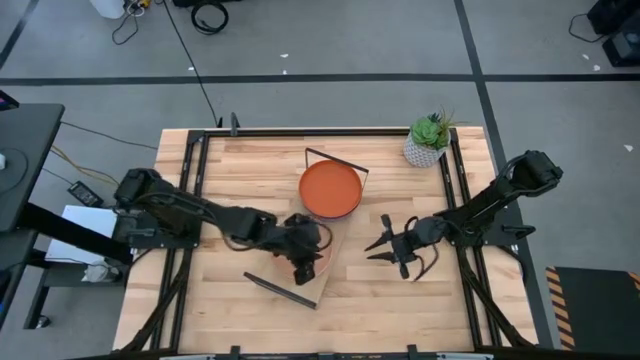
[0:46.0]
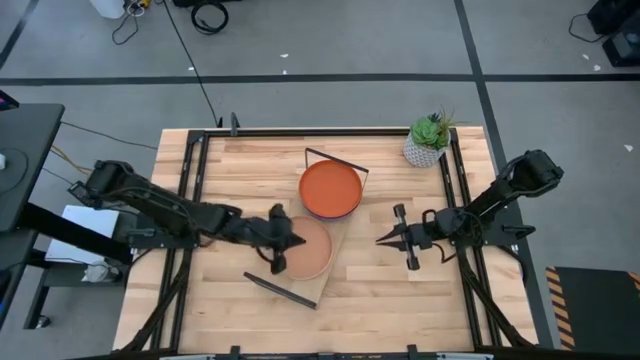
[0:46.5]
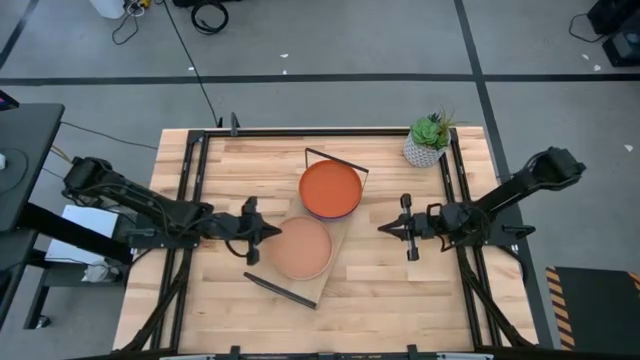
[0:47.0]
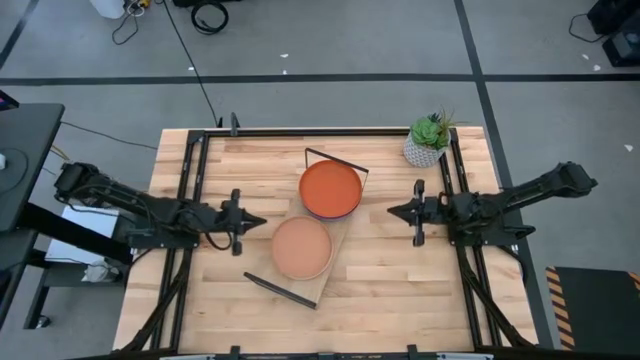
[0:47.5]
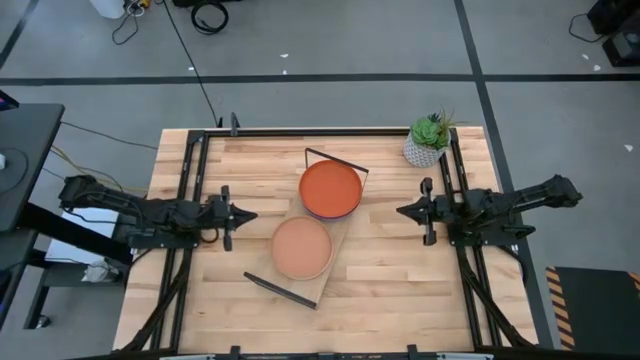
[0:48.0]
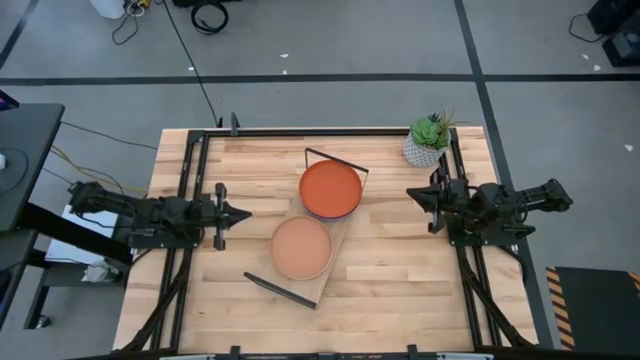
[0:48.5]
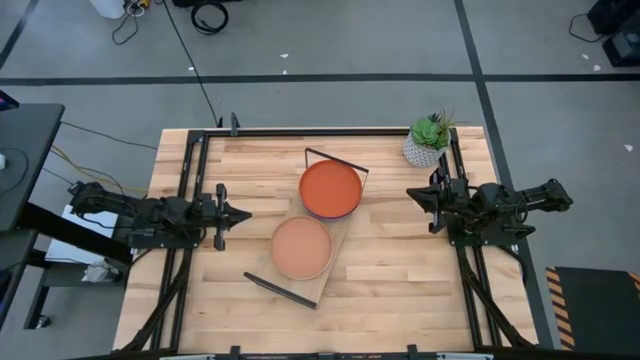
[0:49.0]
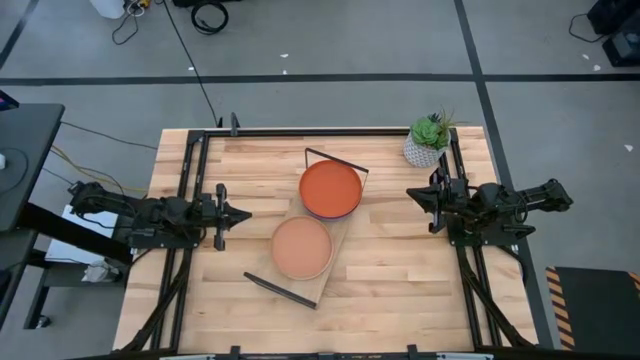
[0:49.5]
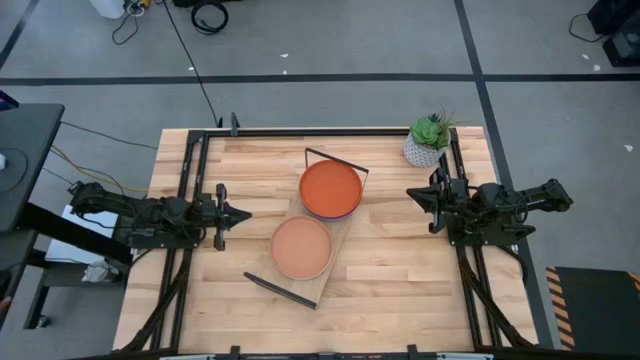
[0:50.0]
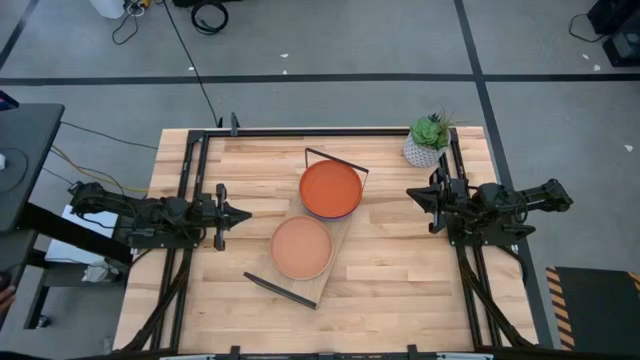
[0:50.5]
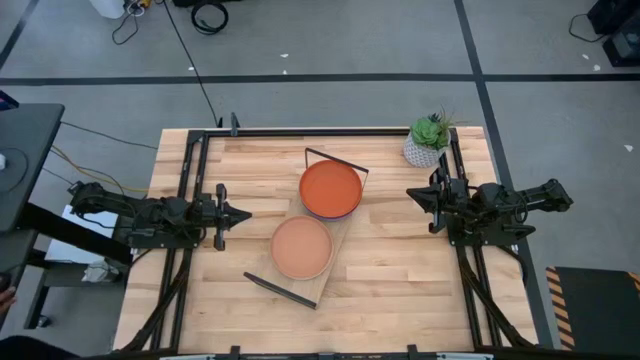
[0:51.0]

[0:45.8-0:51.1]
Task: Place and stack plates onto a shelf
Return to Home Position

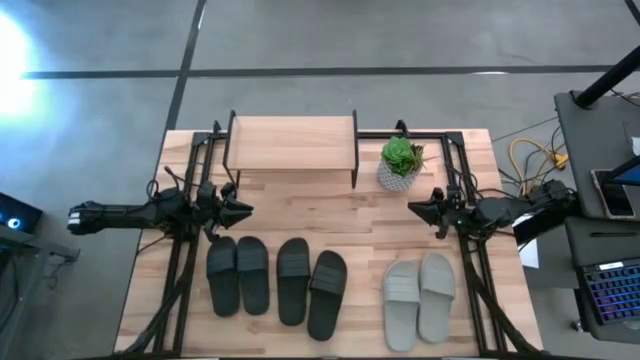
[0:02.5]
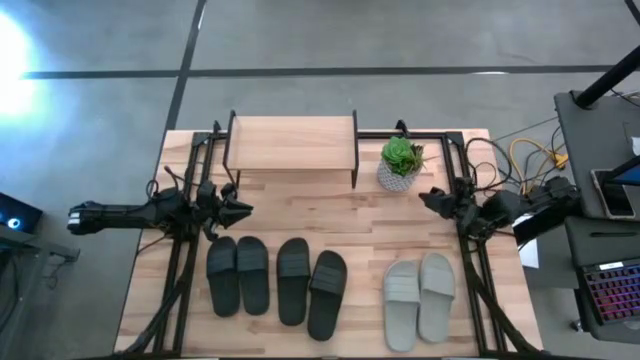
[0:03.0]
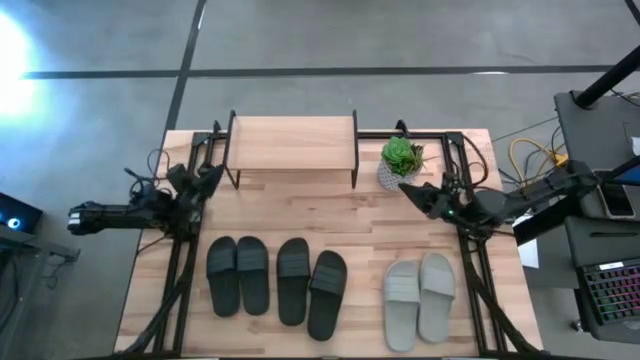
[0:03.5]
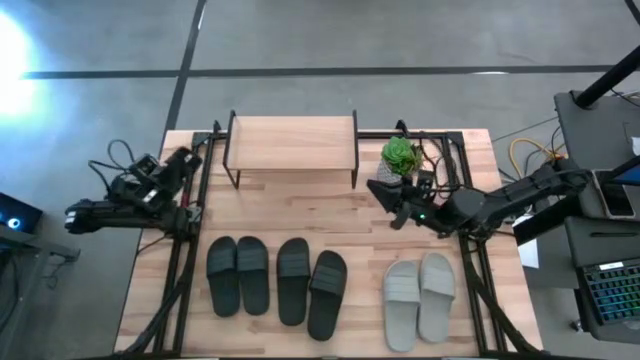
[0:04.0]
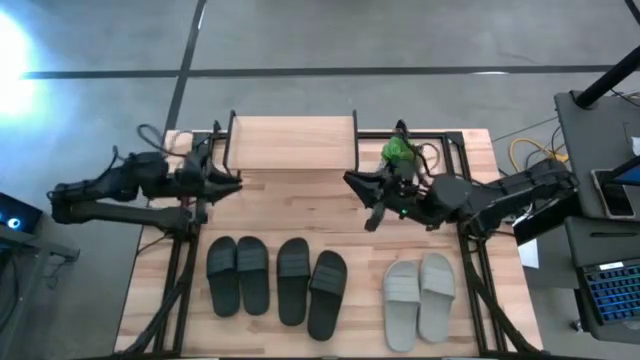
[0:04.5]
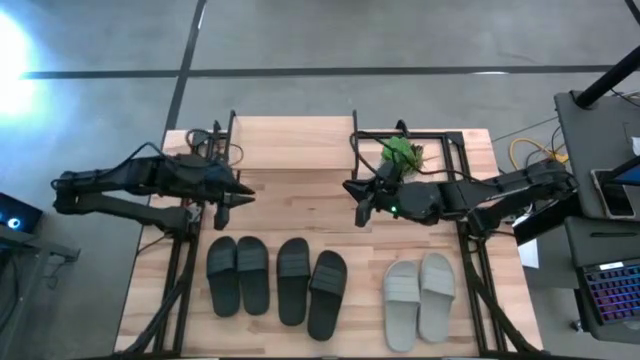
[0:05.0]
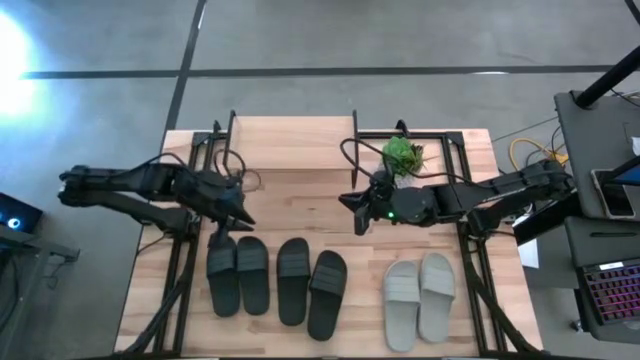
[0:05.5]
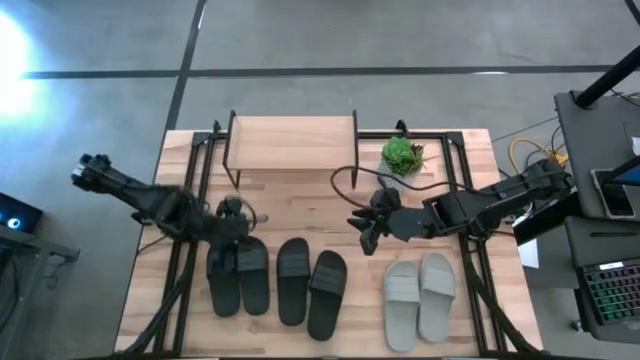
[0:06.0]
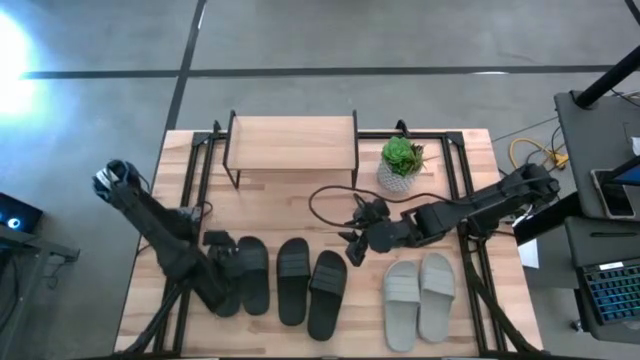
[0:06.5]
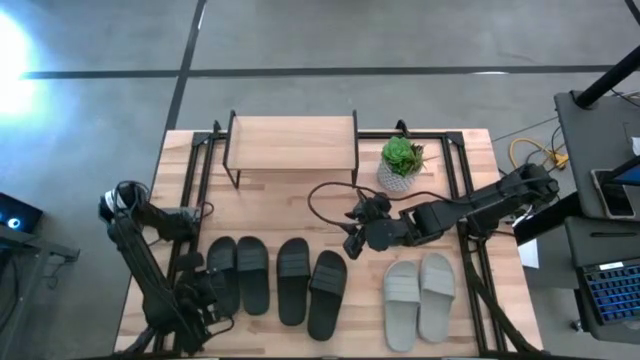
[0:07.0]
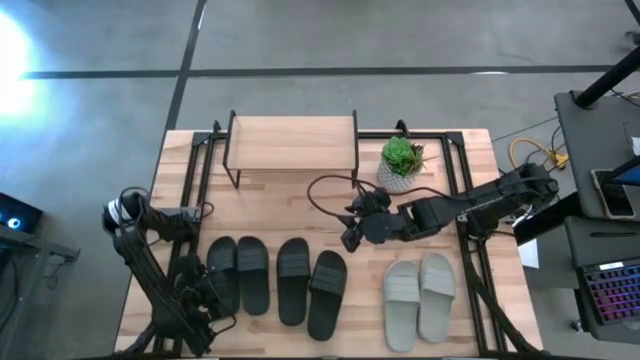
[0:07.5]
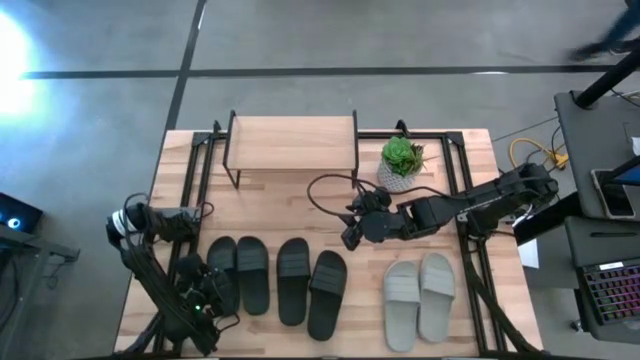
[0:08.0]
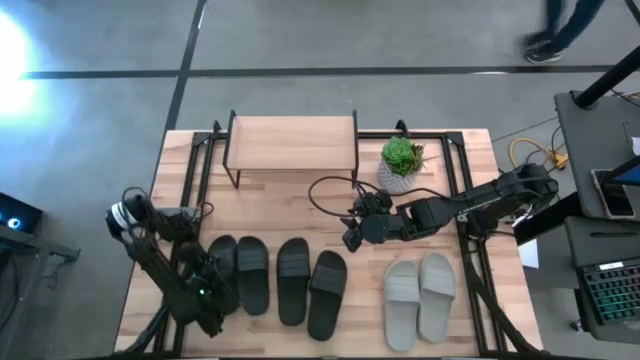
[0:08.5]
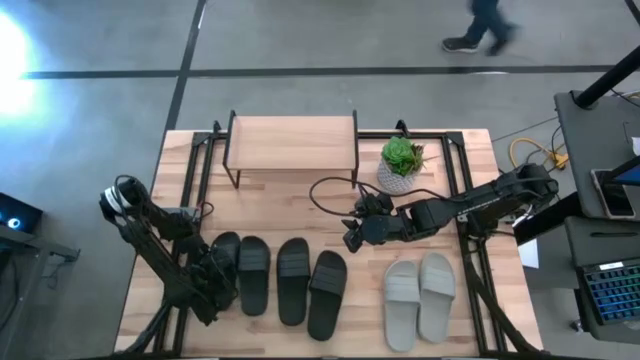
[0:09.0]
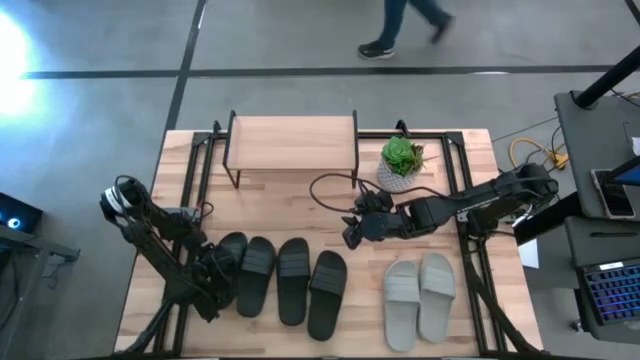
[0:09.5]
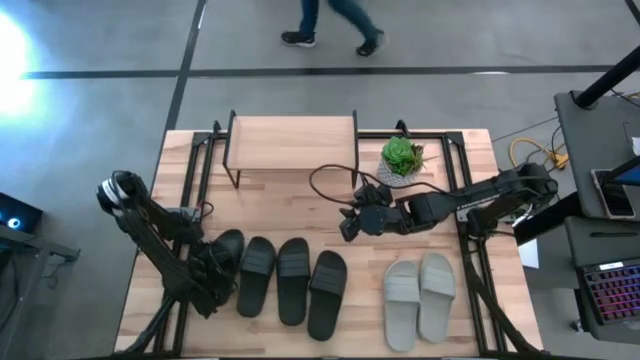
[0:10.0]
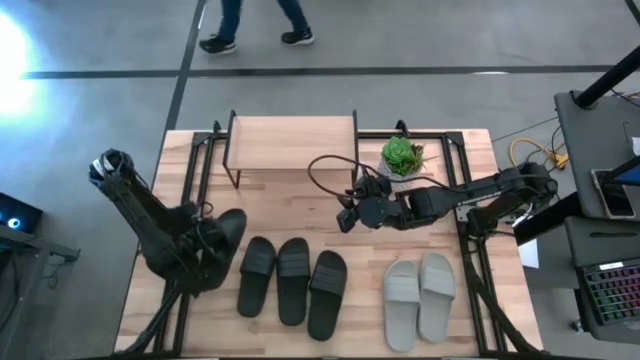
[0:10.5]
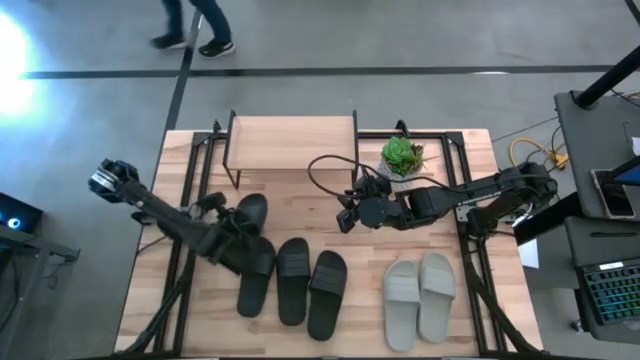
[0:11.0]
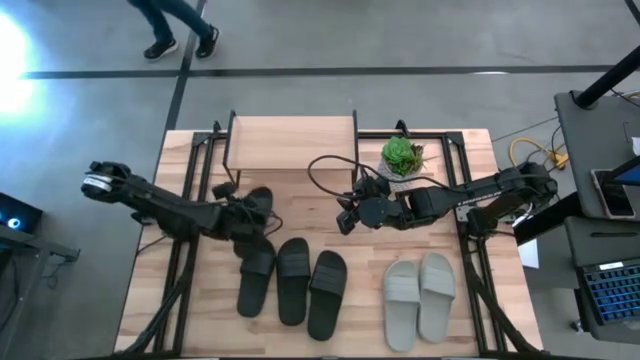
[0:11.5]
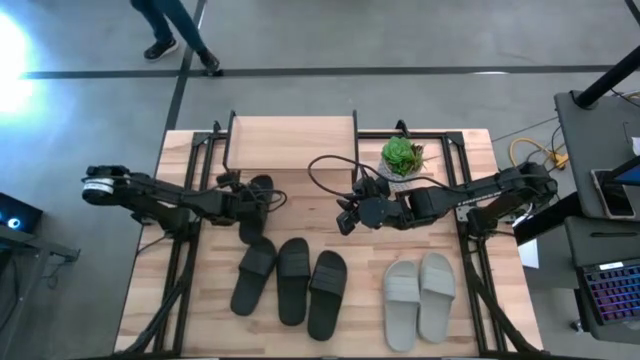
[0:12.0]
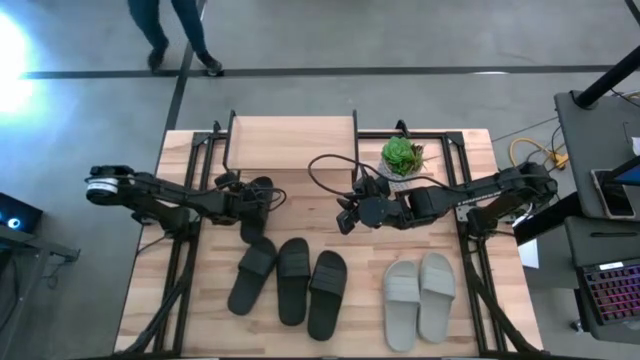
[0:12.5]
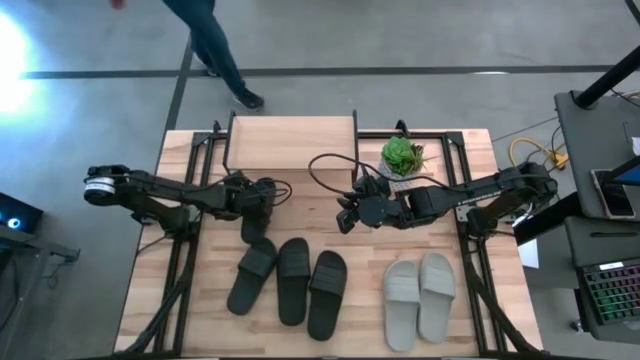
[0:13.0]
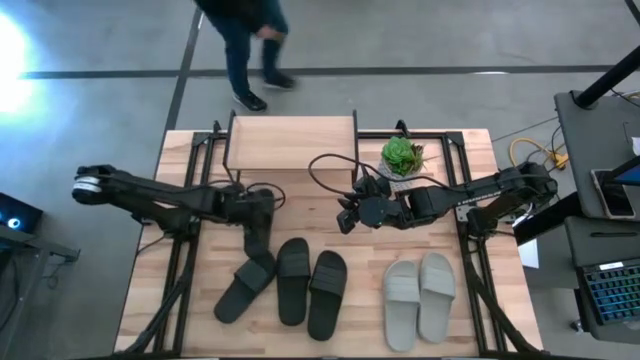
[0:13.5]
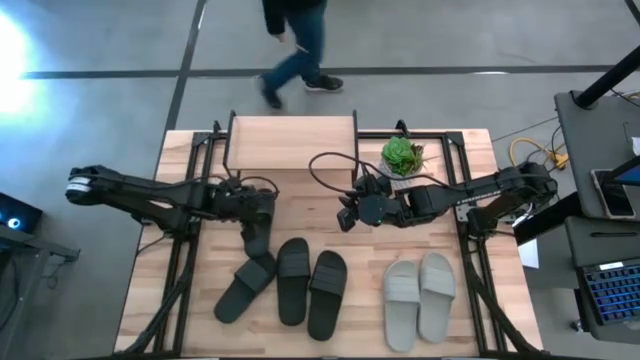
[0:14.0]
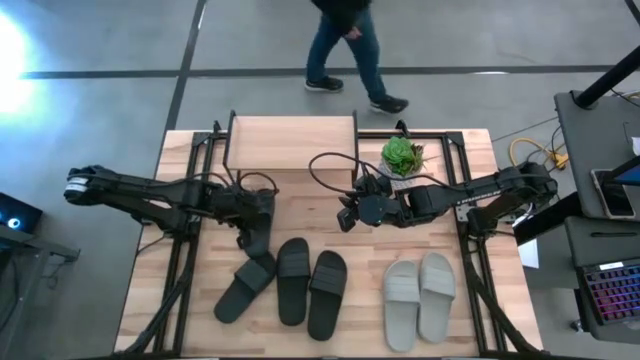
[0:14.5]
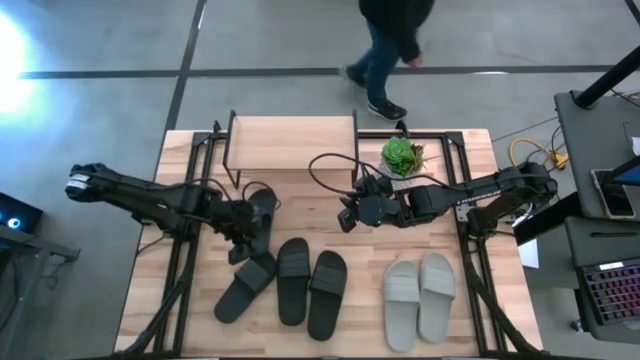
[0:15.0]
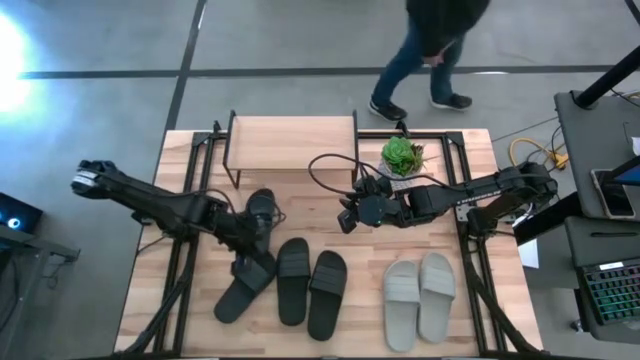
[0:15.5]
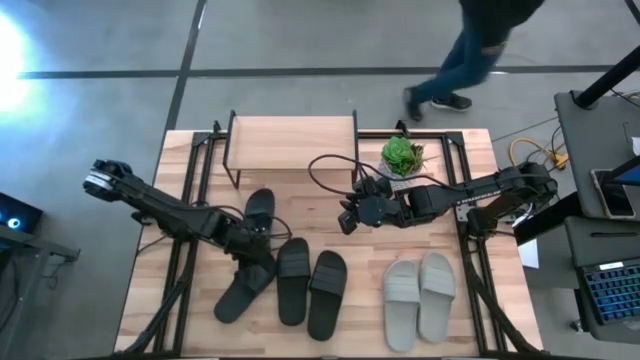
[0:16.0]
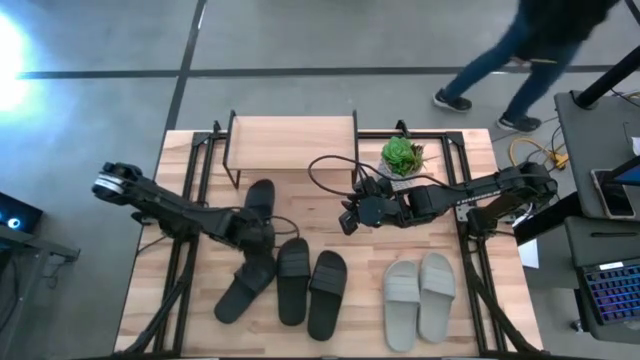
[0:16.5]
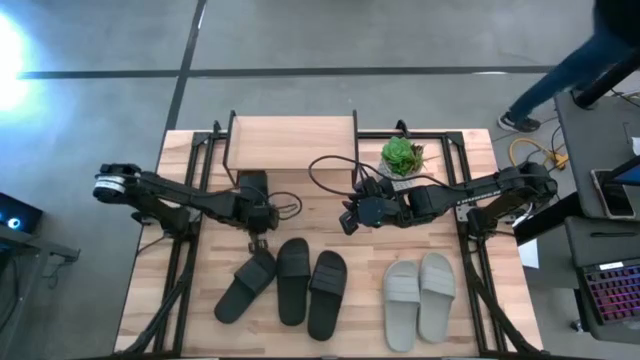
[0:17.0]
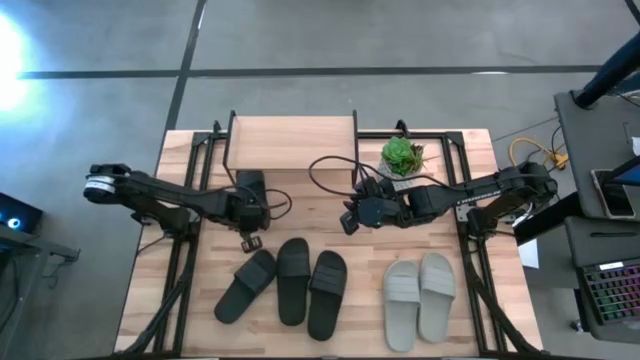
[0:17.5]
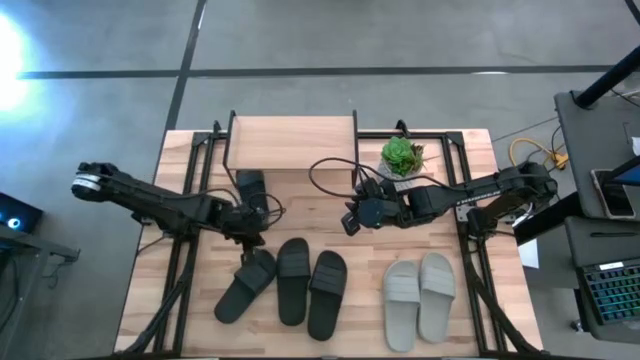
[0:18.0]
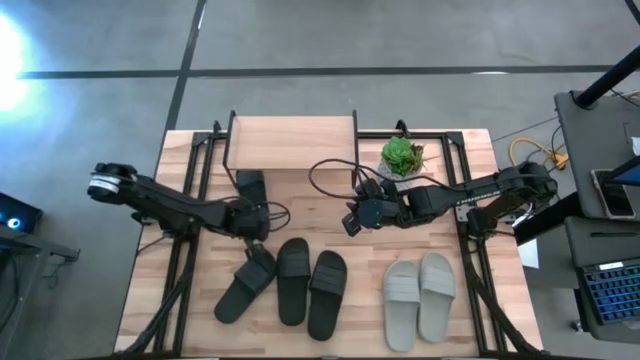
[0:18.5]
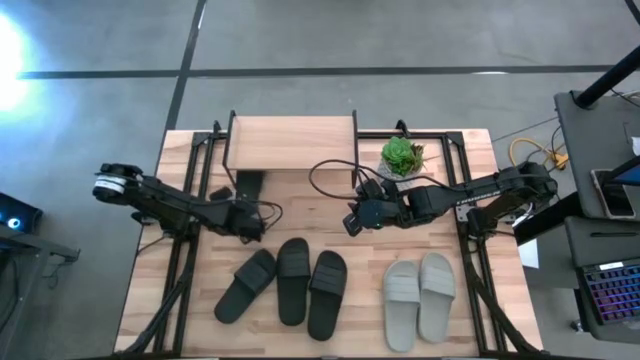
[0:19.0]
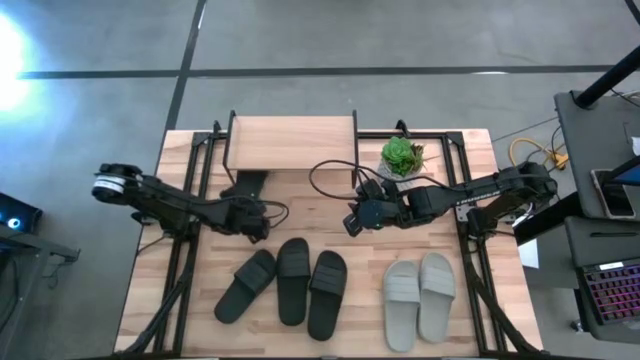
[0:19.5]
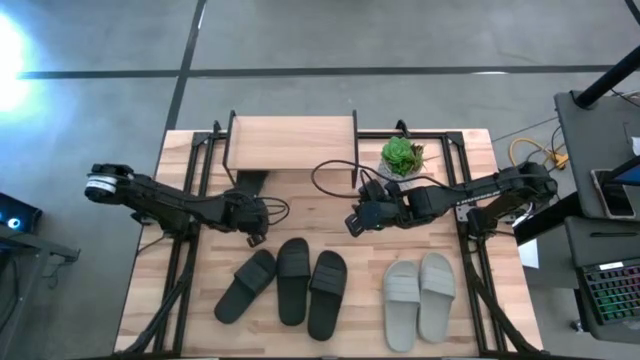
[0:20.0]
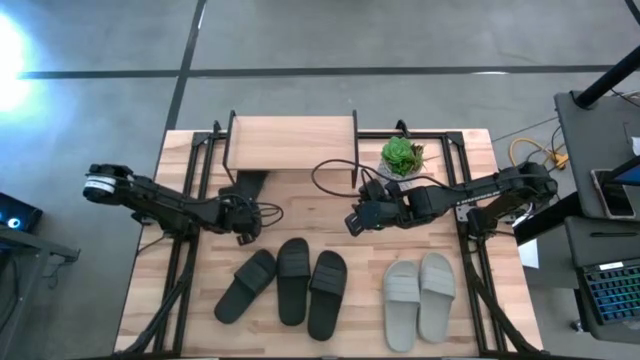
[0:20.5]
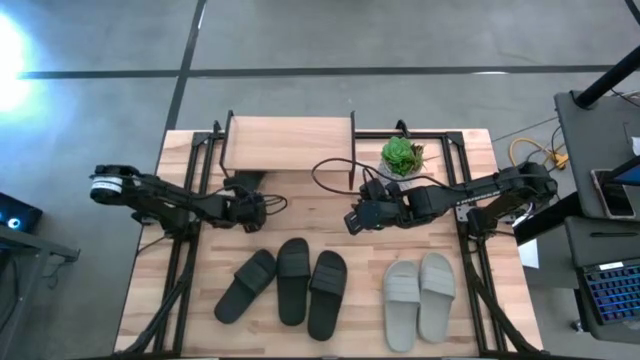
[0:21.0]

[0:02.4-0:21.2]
Task: Pick and place slides into the shelf
Put the black slide under the shelf
